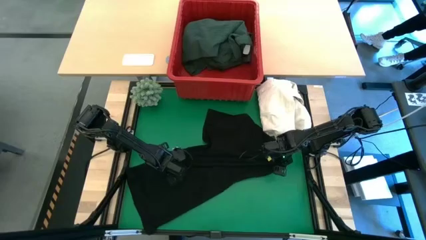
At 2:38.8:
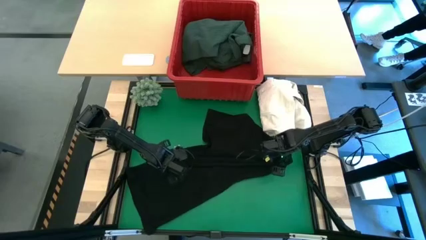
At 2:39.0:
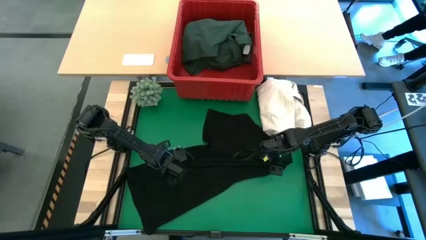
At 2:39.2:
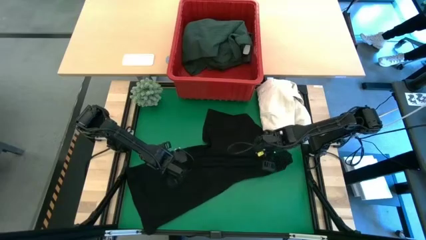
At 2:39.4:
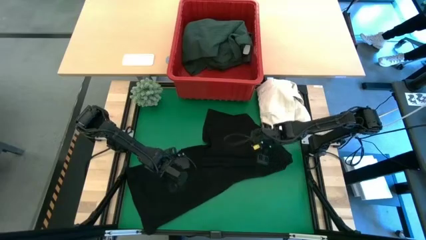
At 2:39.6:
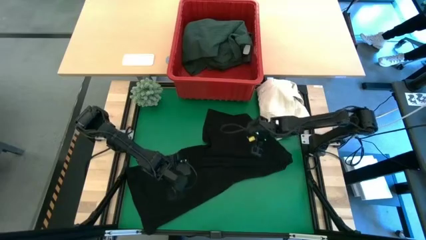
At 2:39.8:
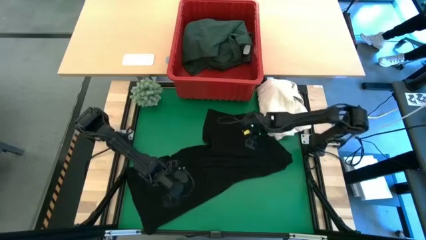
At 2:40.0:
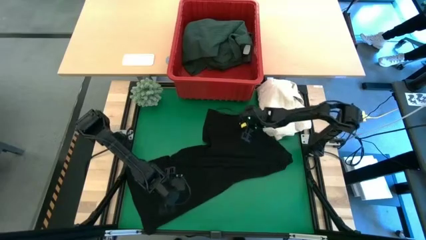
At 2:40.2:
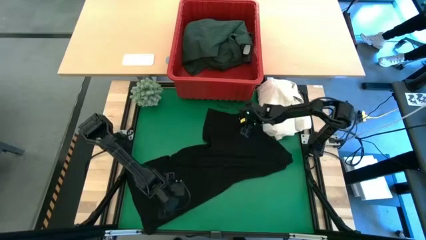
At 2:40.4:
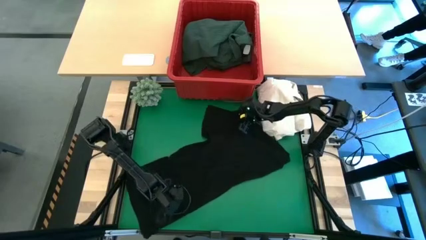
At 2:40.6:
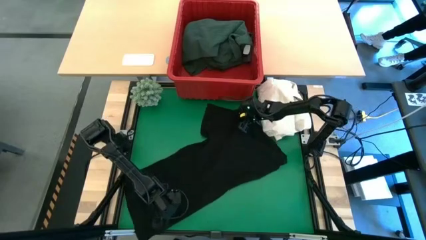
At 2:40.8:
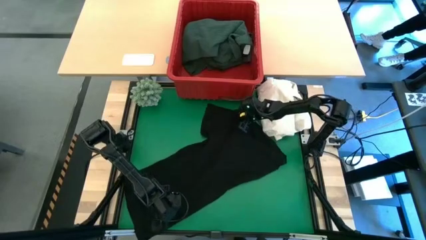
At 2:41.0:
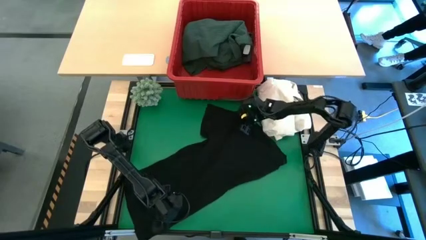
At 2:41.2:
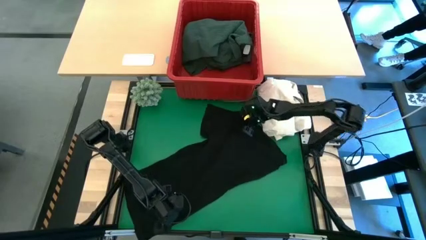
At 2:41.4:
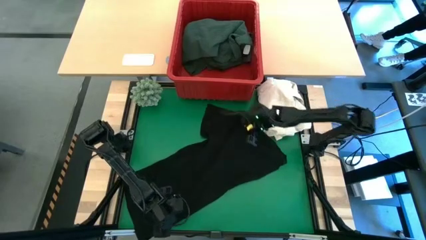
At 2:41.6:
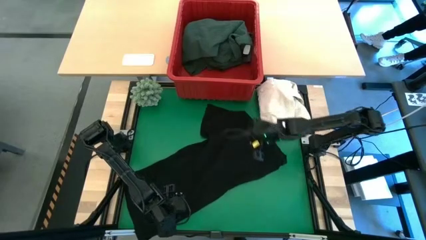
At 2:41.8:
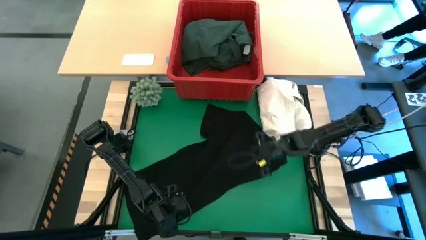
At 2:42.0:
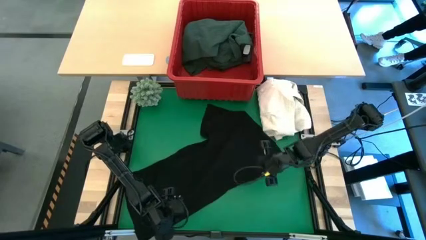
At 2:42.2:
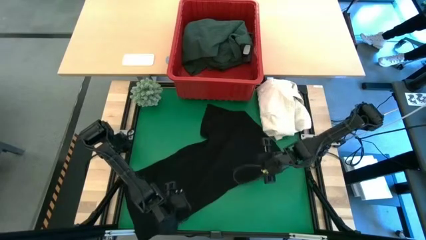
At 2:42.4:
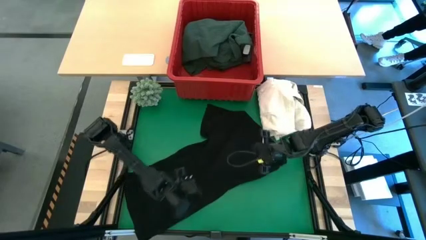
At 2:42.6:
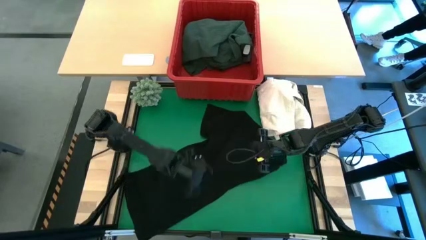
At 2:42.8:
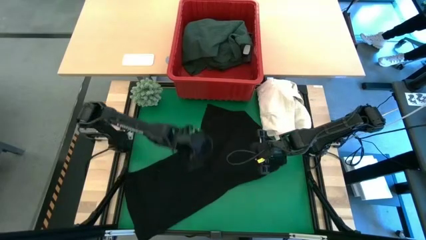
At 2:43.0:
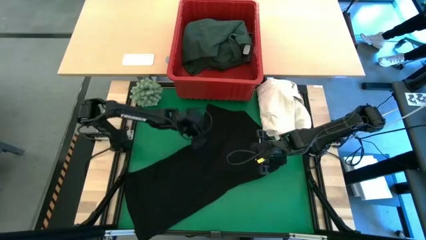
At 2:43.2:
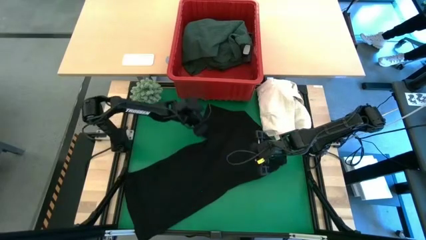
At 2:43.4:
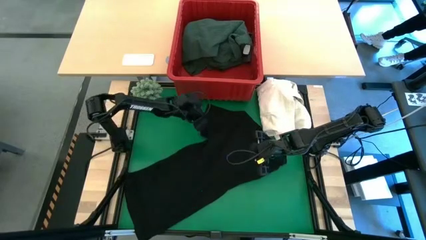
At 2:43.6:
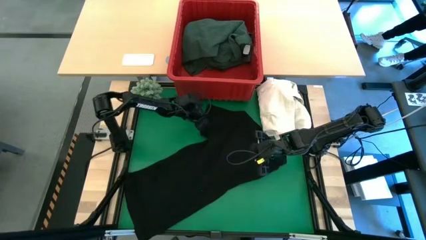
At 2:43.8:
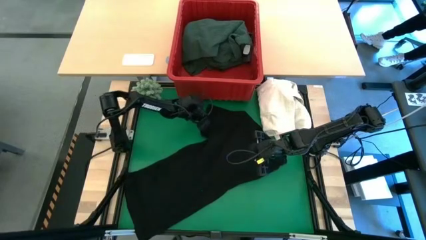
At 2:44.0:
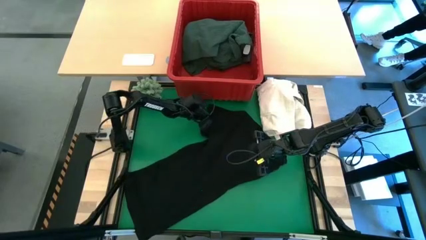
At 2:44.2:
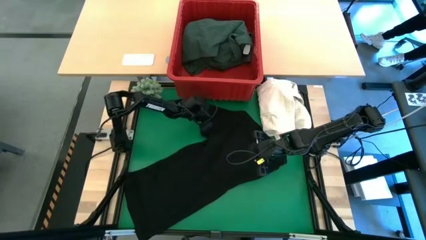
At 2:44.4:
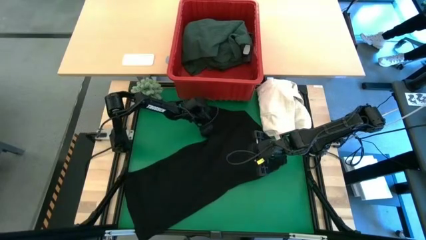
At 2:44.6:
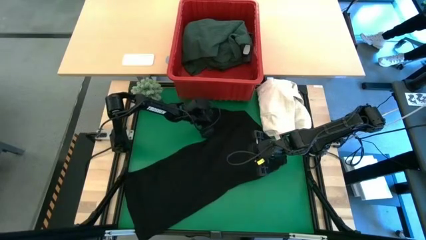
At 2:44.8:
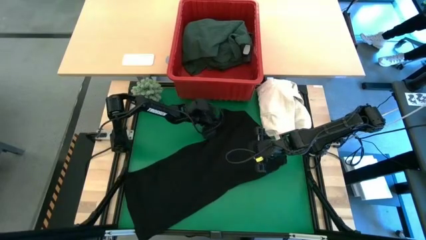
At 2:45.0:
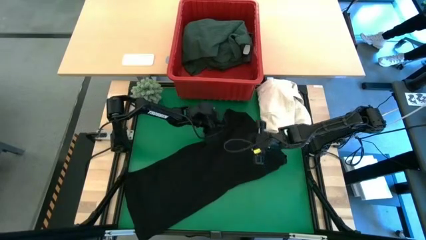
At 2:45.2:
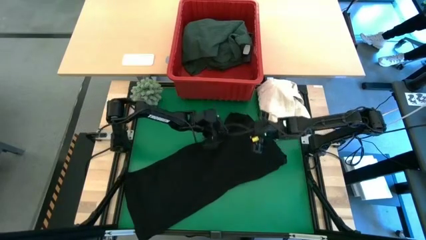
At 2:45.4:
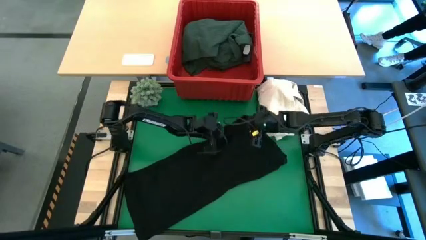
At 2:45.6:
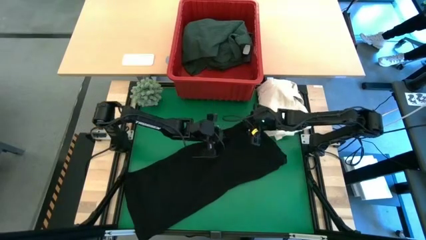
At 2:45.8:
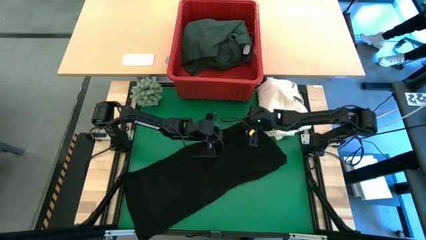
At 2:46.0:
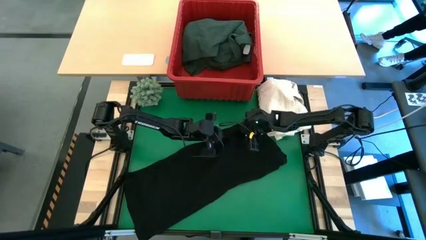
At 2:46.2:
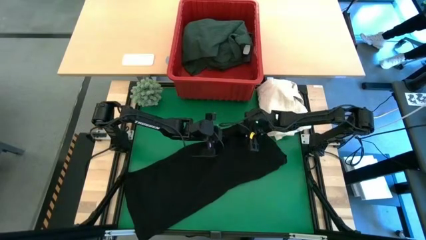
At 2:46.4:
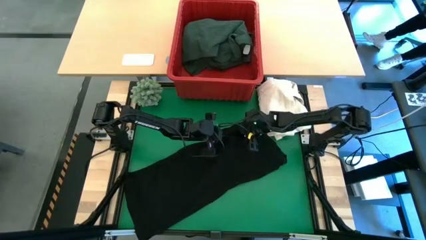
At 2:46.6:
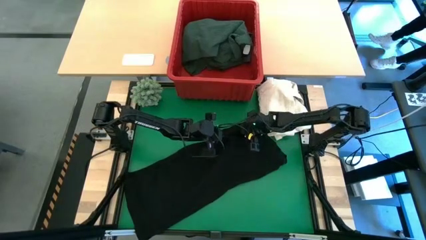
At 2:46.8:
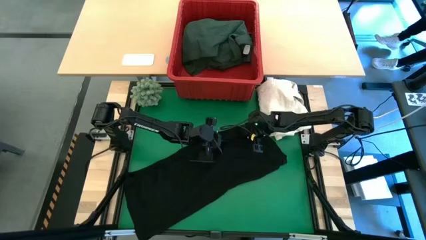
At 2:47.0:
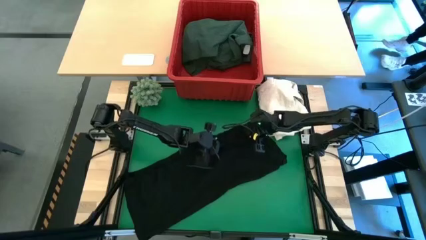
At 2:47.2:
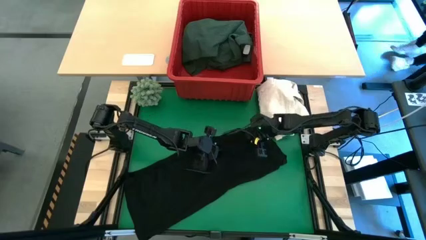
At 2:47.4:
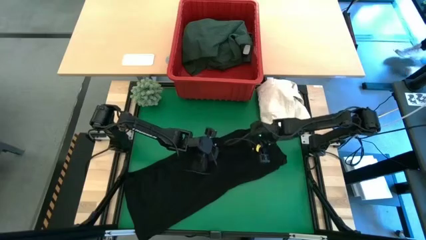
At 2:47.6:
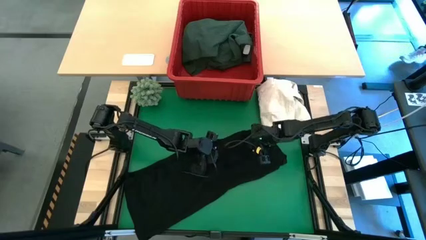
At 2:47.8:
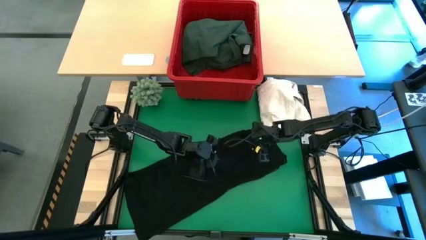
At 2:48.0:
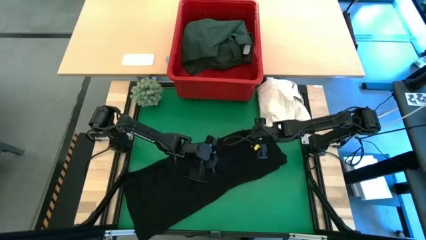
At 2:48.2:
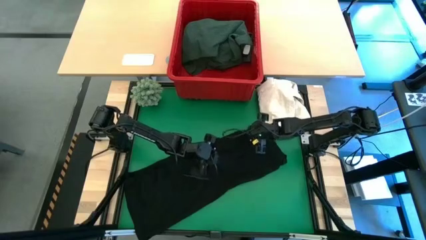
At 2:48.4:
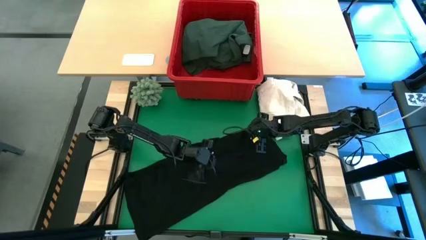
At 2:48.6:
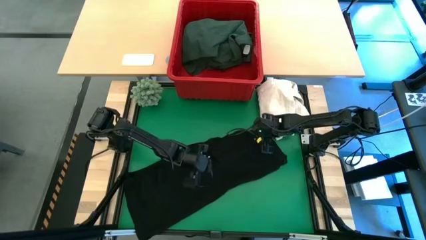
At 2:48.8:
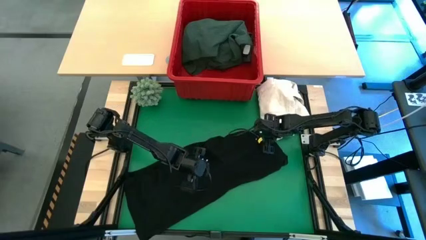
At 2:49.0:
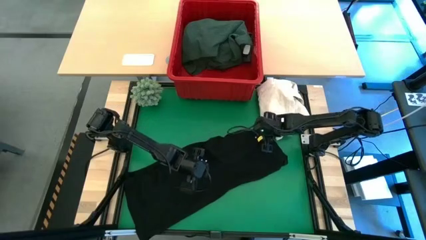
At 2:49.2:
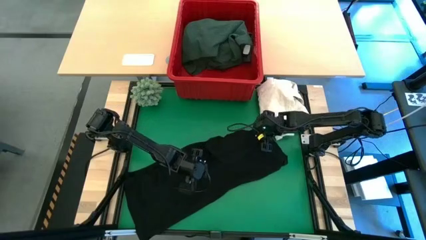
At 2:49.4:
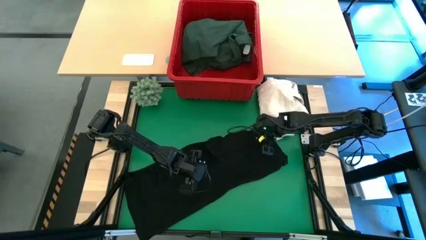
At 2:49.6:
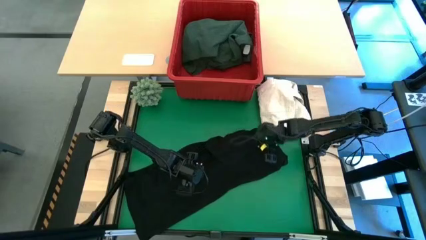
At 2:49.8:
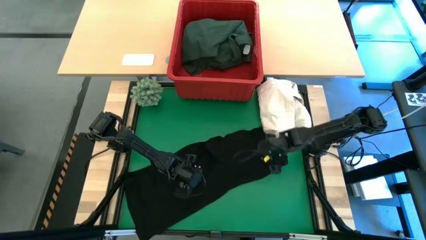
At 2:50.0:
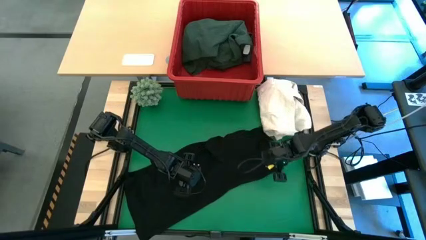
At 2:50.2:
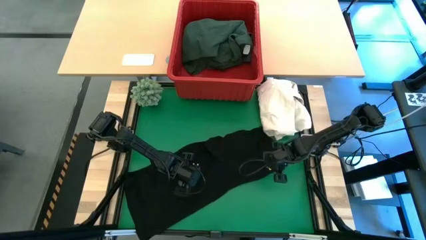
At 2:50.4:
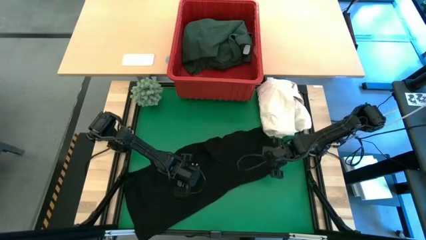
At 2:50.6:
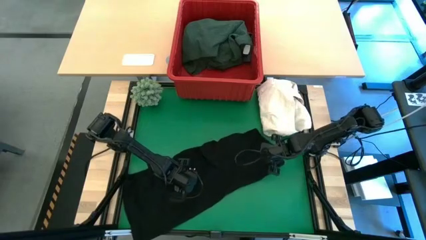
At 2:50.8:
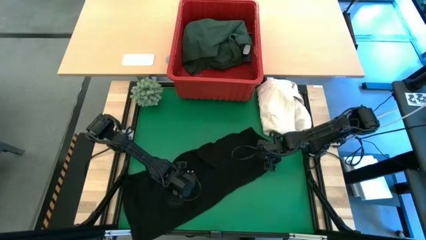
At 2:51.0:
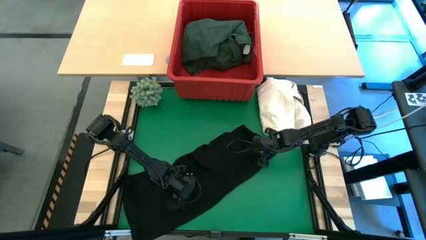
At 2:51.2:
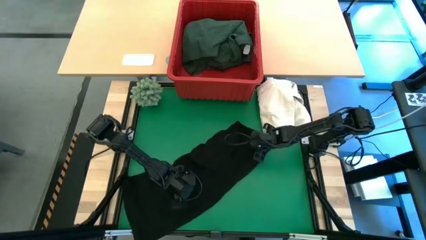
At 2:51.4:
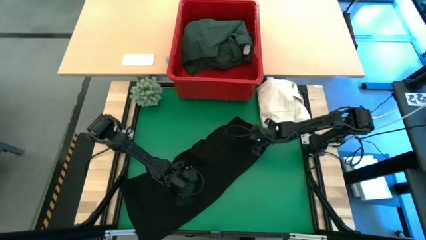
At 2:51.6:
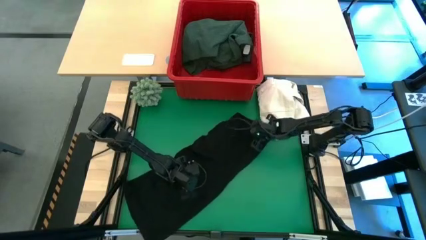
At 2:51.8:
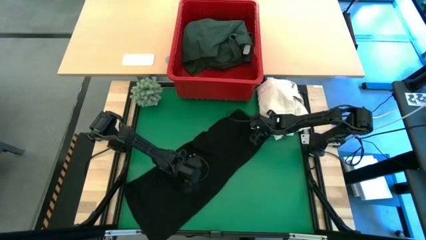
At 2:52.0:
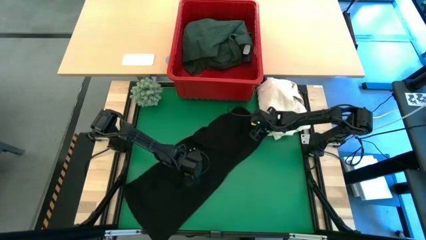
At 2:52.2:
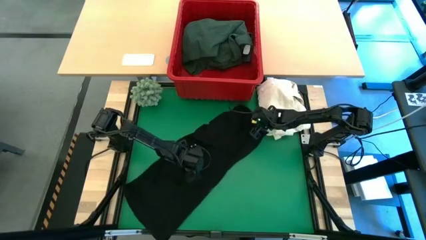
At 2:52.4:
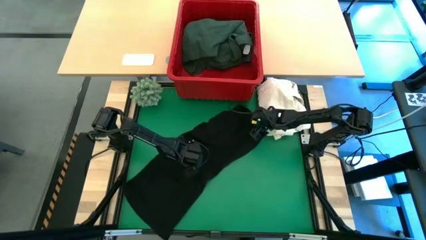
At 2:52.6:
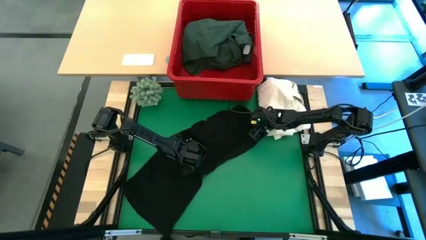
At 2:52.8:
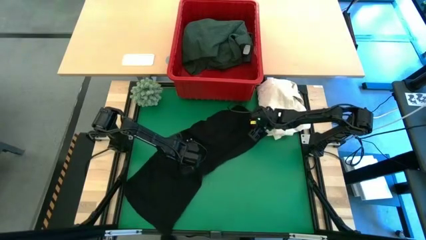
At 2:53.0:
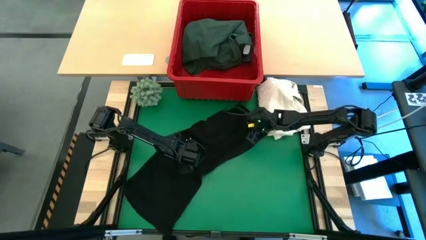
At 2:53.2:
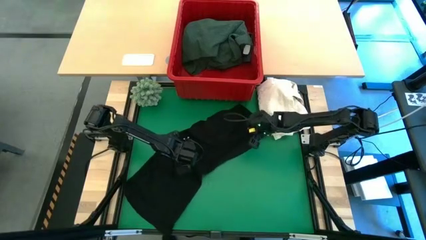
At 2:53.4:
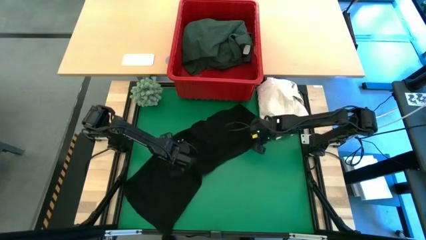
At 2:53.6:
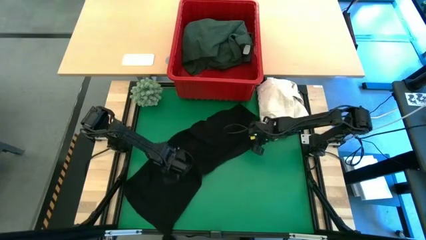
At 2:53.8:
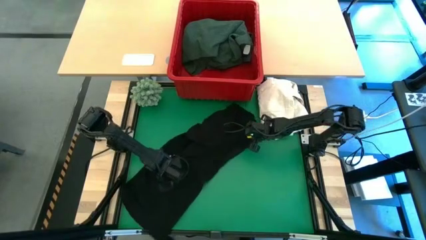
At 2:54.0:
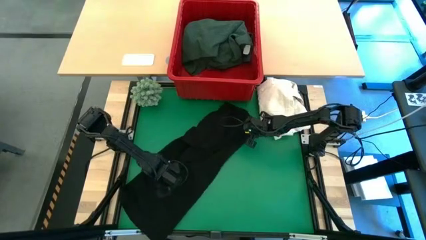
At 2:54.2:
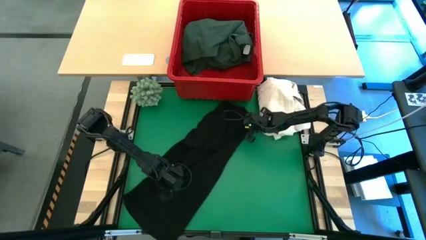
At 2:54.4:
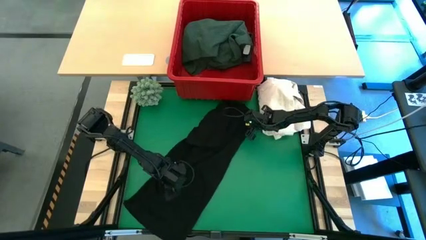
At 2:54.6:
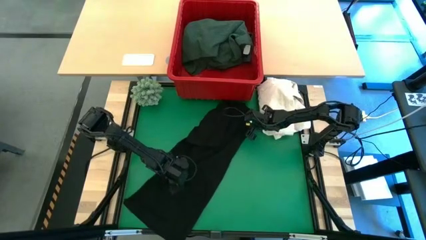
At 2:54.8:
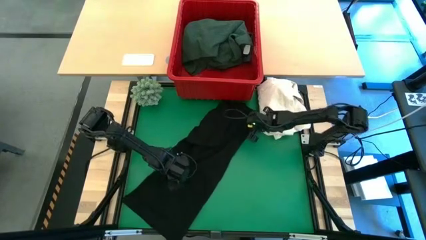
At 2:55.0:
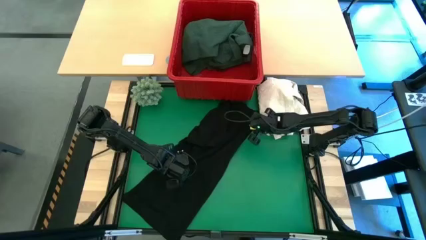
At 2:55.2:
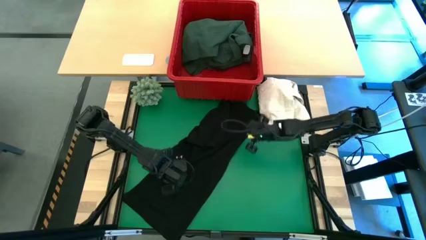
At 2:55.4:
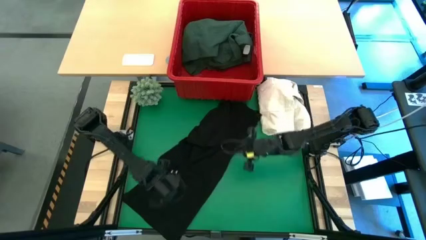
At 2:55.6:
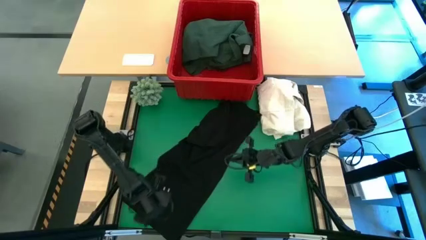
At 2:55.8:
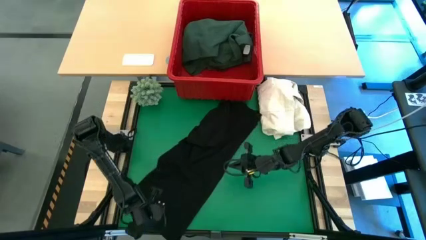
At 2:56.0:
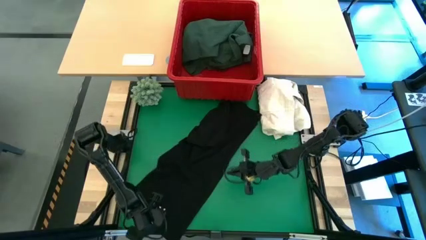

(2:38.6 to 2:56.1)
Task: Fold laundry
Fold the black shirt
